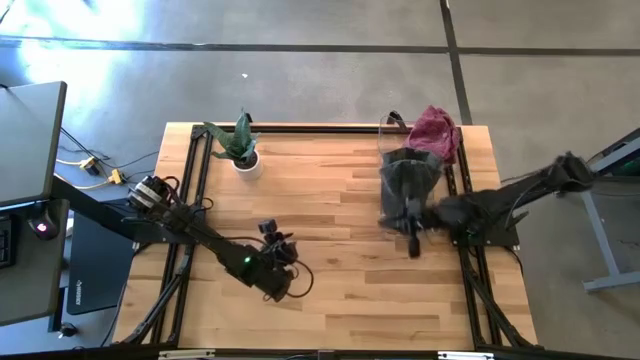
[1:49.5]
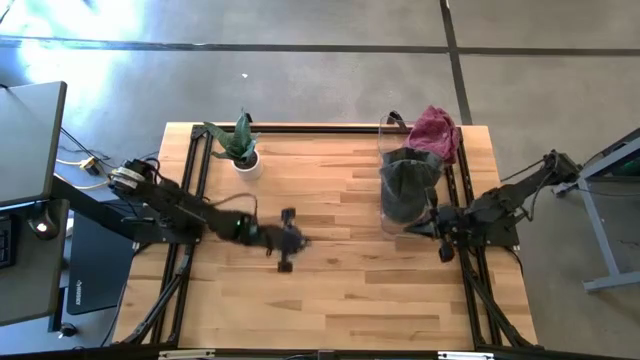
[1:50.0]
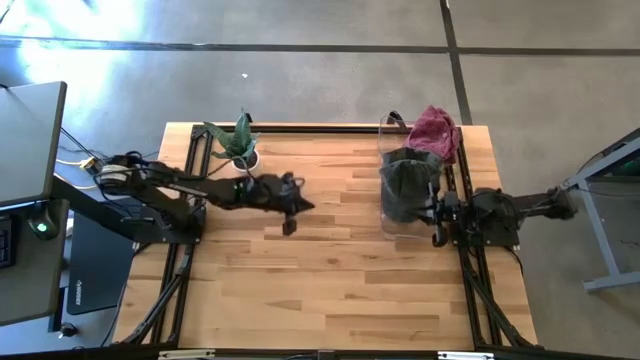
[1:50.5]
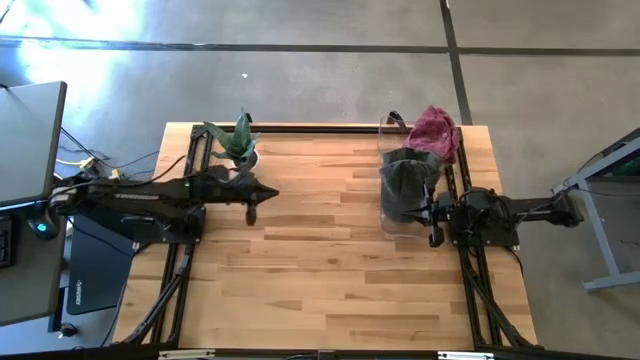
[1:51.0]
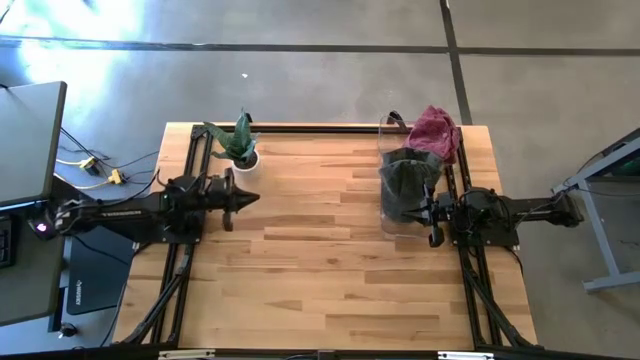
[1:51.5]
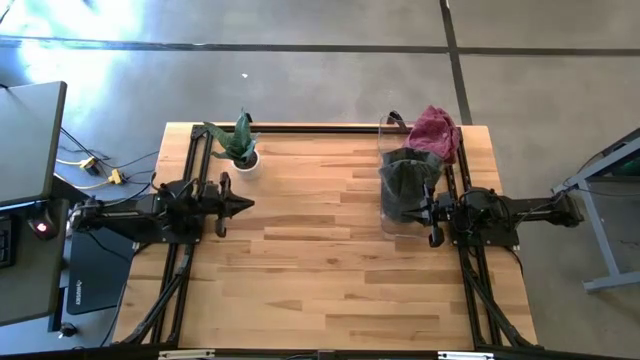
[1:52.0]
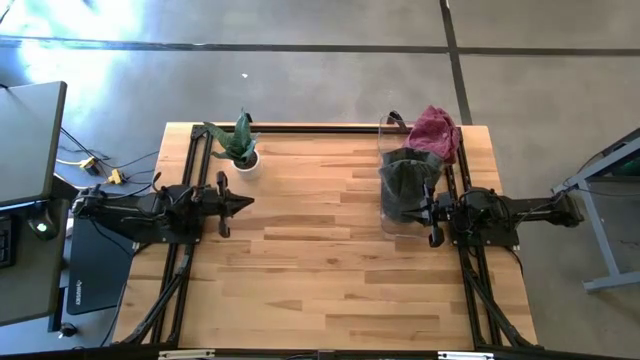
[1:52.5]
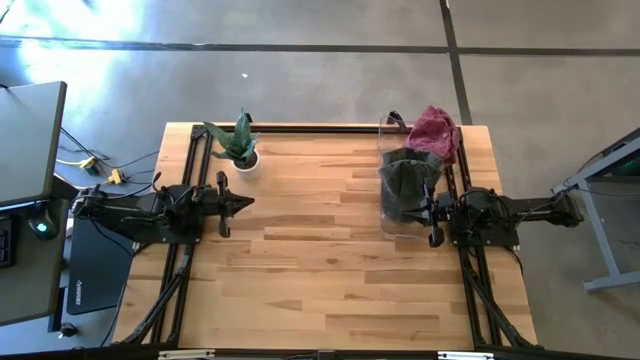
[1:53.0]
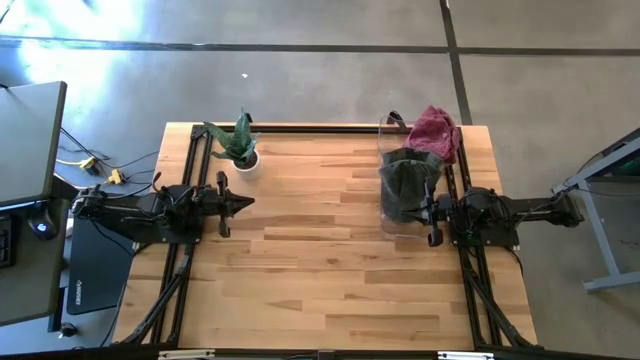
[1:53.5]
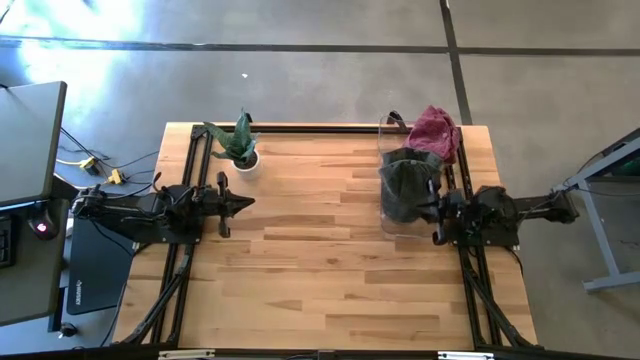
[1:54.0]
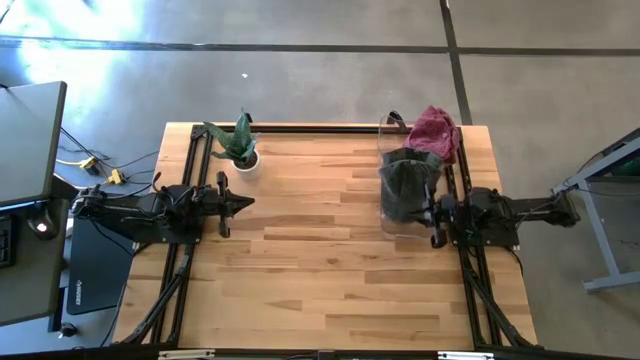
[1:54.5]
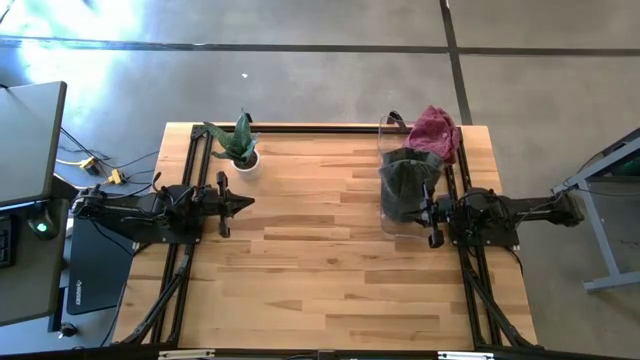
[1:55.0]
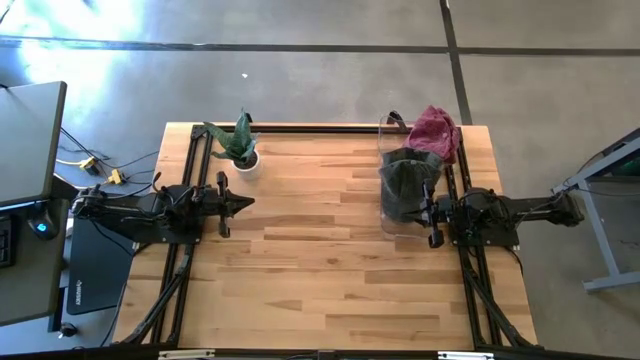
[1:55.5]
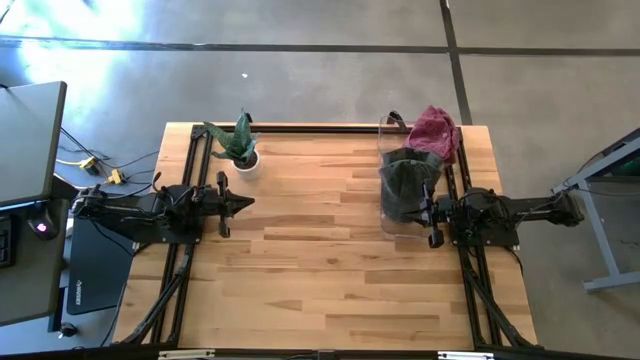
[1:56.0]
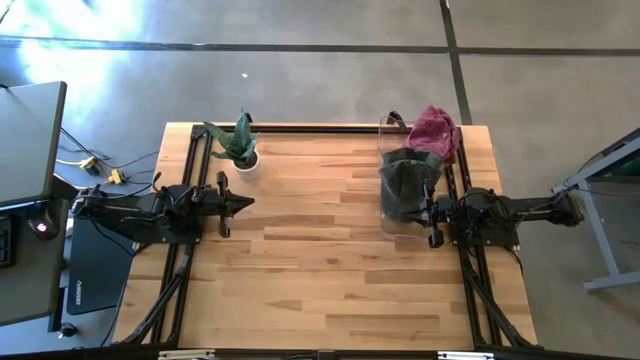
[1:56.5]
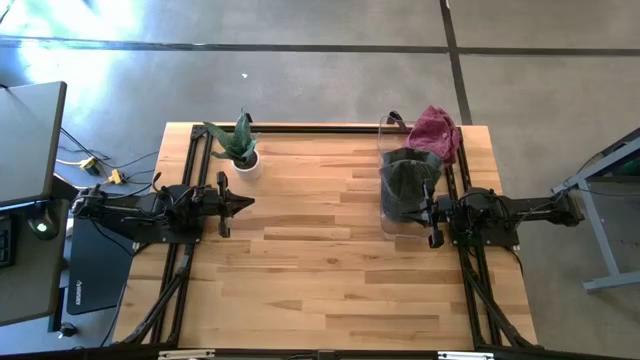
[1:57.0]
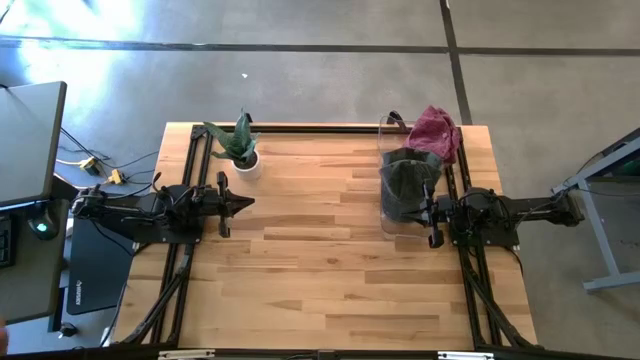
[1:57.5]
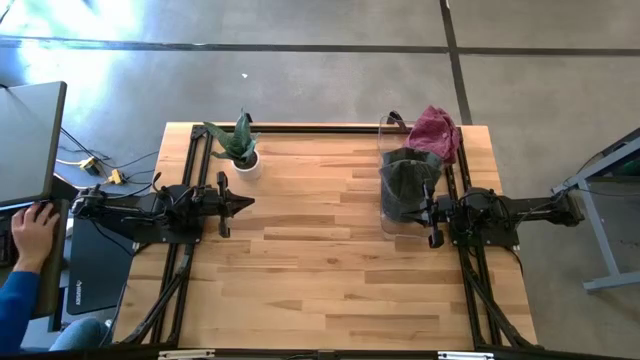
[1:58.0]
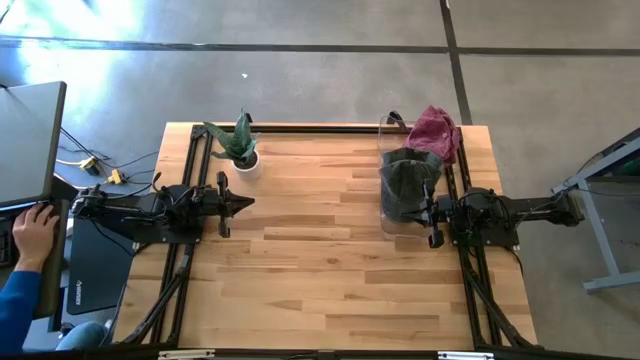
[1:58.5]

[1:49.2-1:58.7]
Task: Pick & Place hat
Return to Home Position

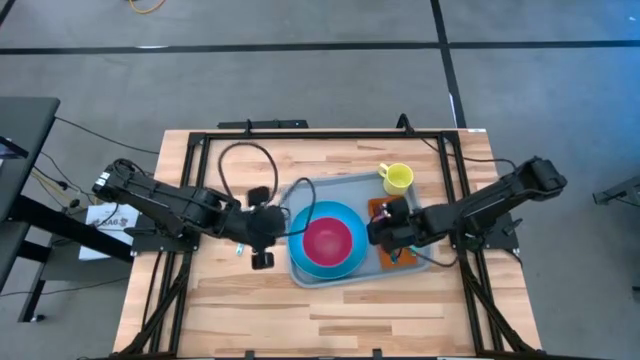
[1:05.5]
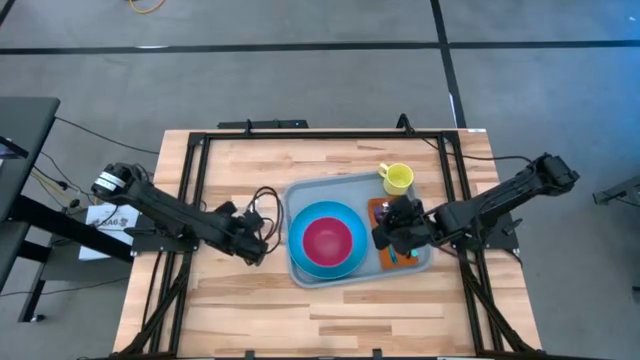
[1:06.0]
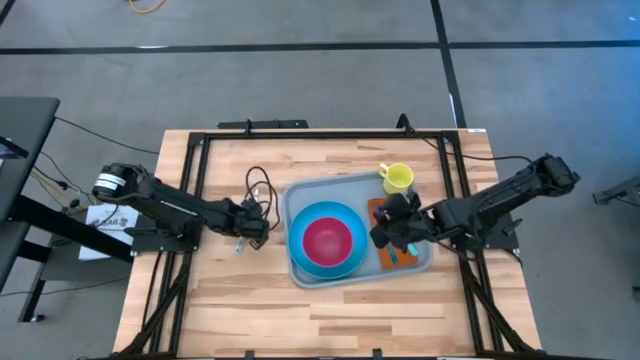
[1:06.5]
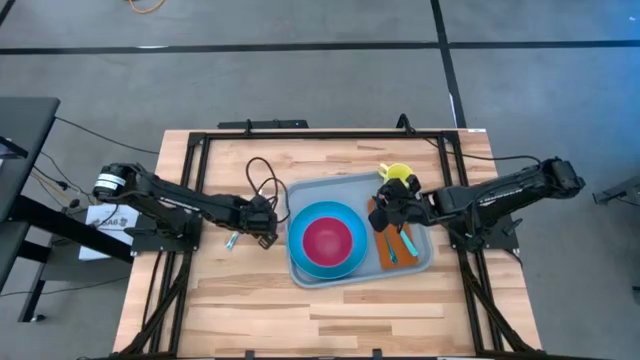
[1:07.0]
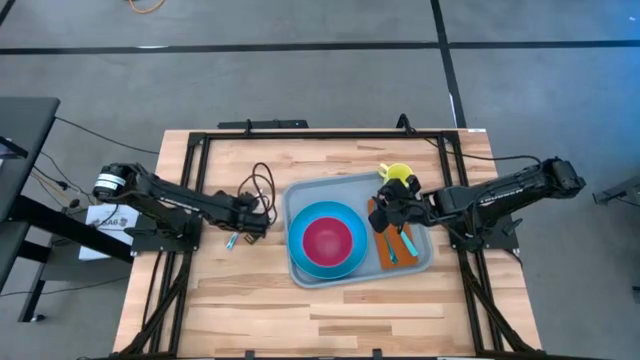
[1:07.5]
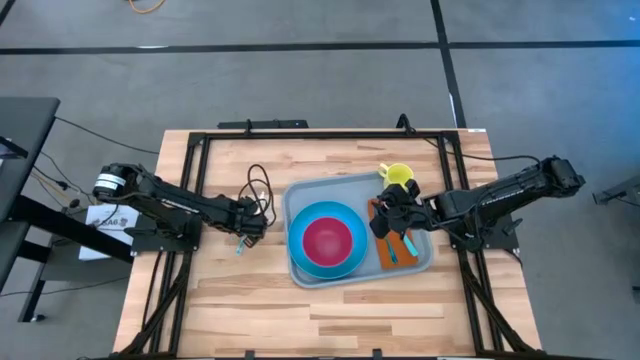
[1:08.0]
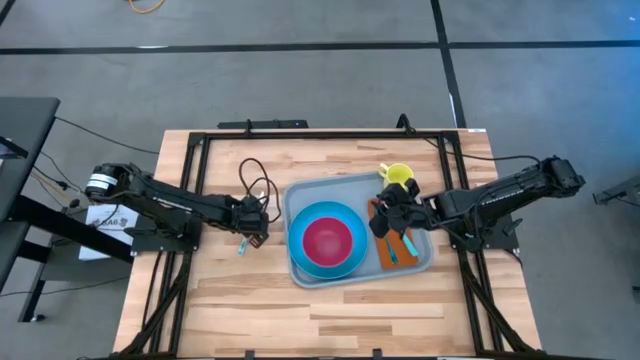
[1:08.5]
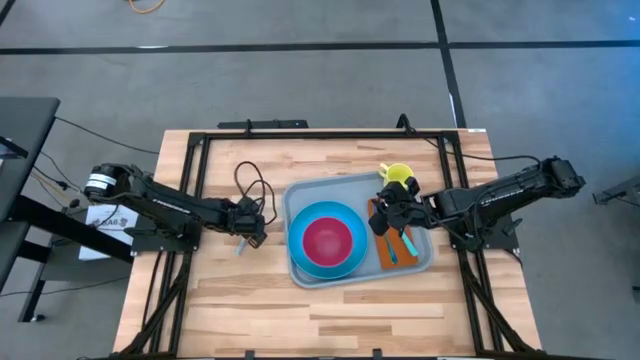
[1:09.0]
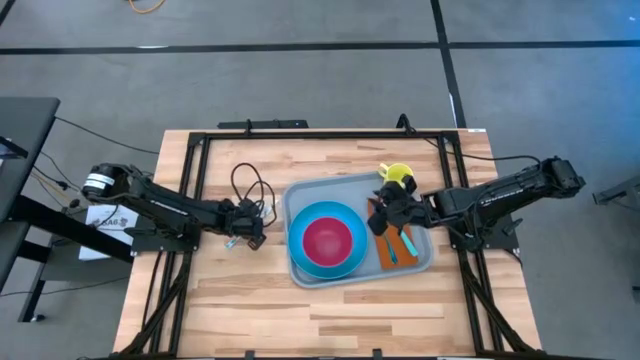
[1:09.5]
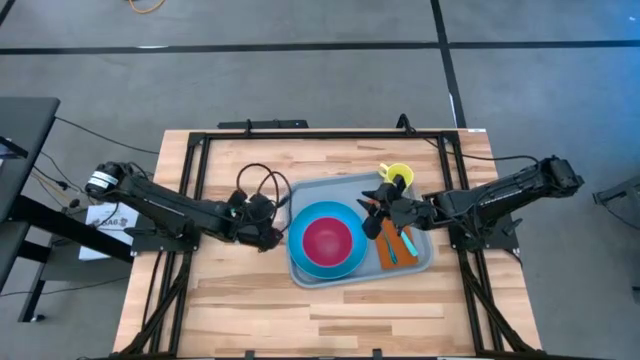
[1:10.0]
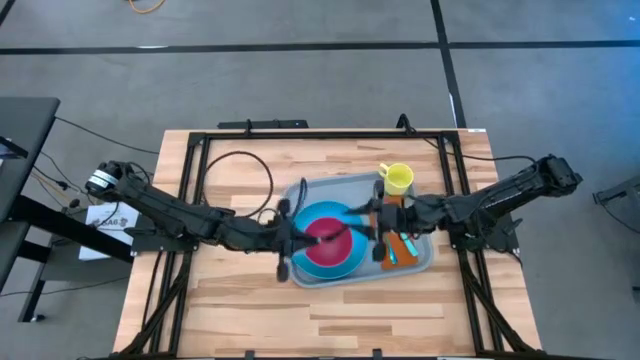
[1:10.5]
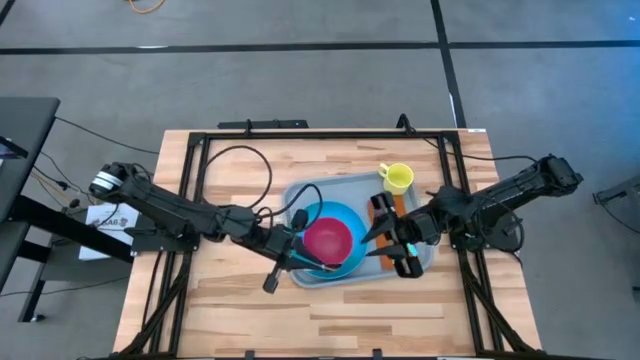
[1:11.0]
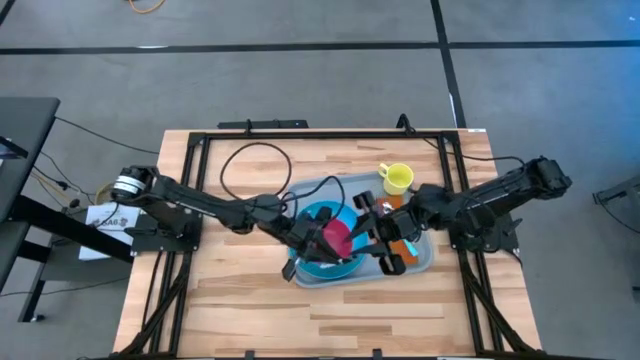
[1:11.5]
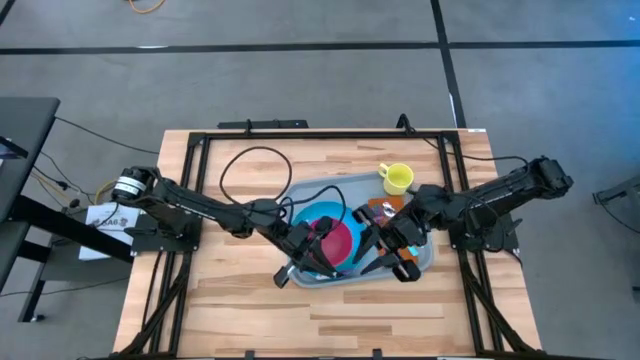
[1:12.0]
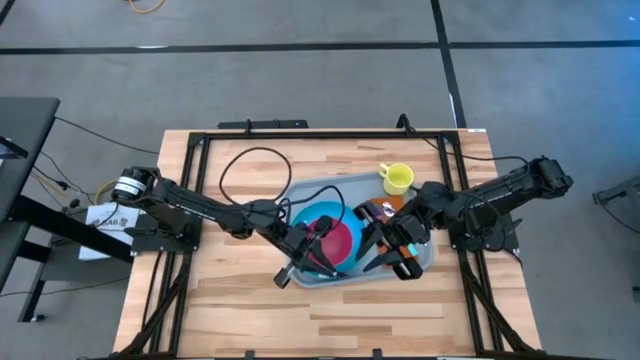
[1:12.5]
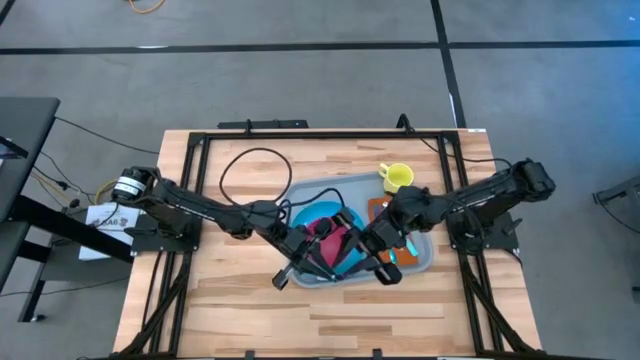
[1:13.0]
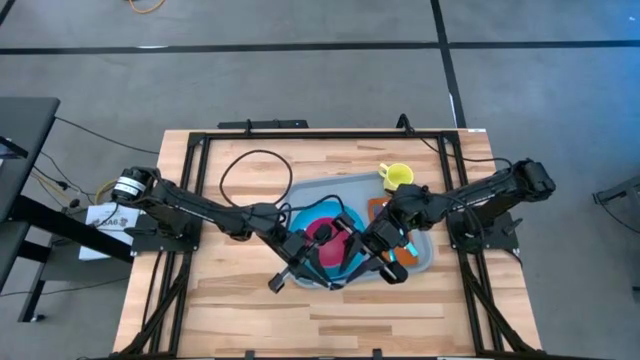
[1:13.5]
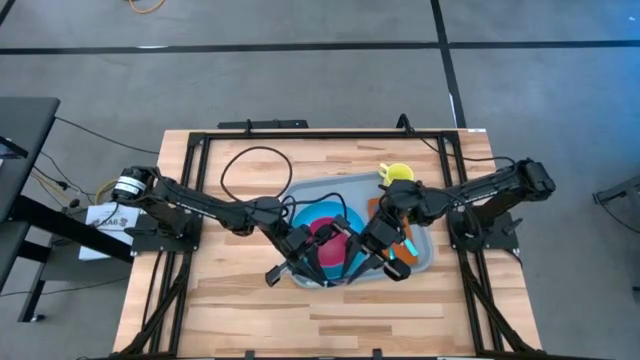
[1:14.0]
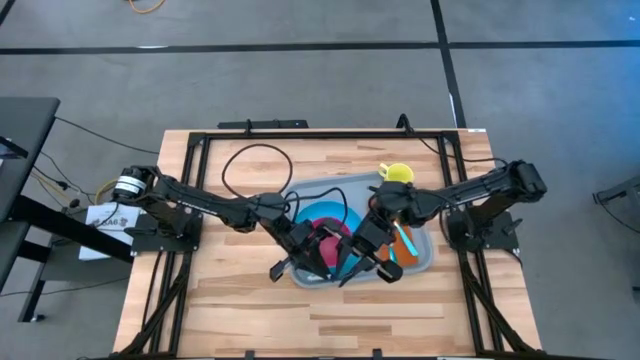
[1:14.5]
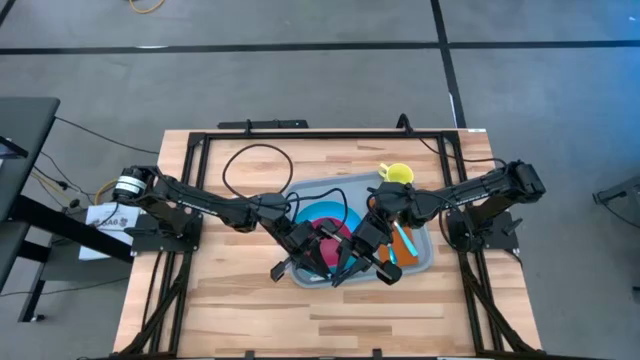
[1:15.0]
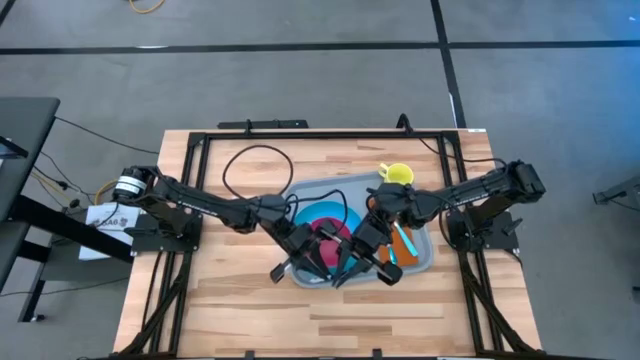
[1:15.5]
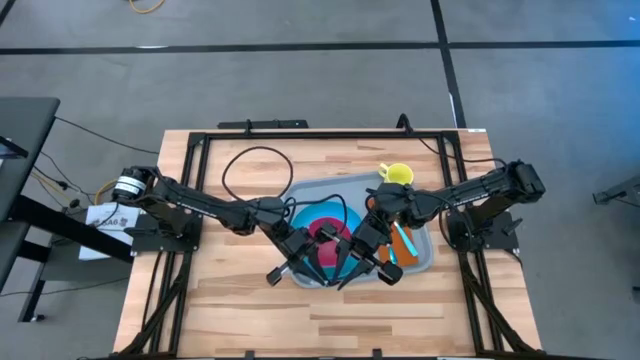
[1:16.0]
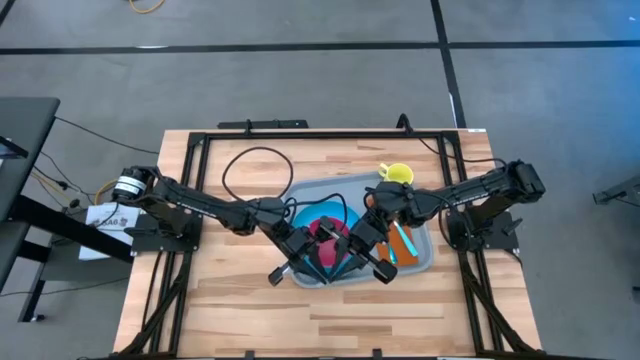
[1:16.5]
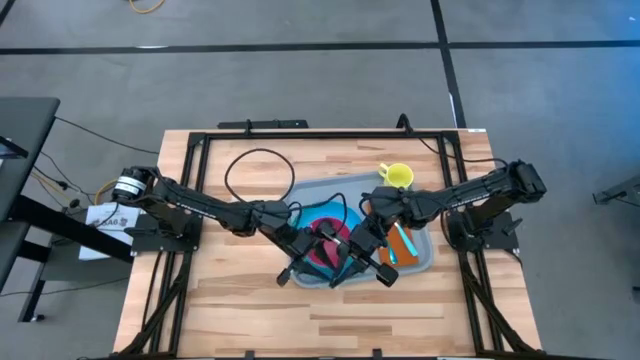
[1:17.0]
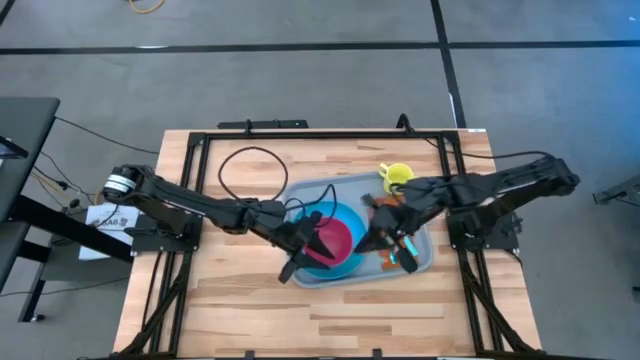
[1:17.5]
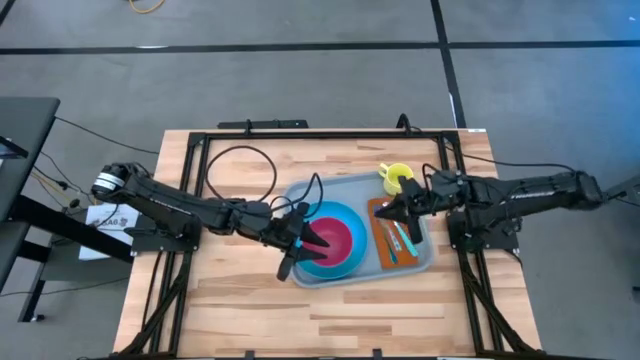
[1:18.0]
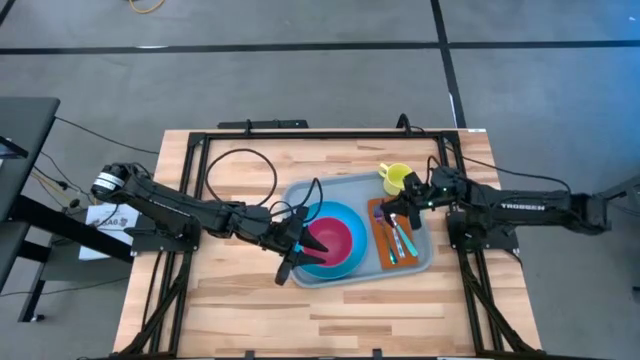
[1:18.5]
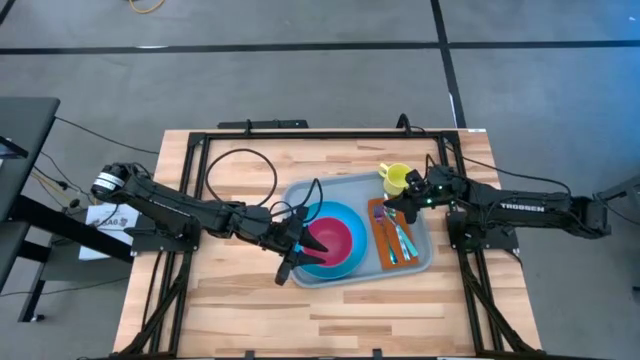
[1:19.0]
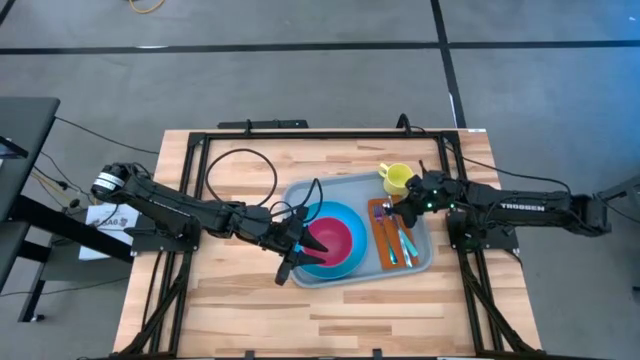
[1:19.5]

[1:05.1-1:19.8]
Task: Set up tray
Put the green knife on the brown napkin to the left of the green spoon
